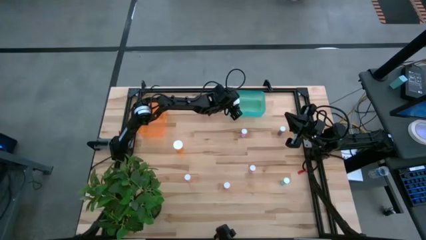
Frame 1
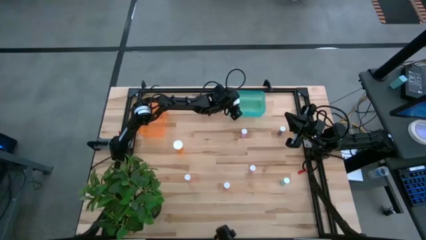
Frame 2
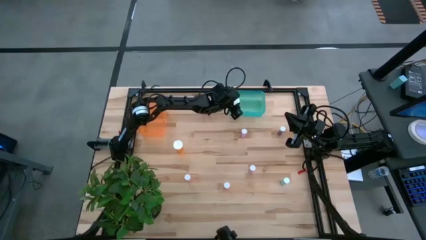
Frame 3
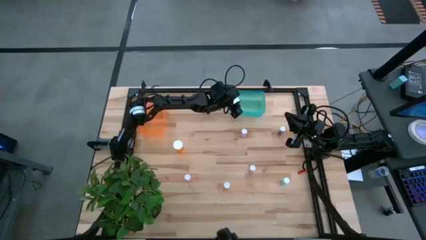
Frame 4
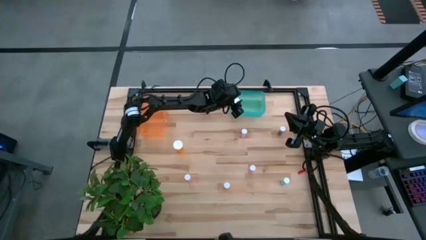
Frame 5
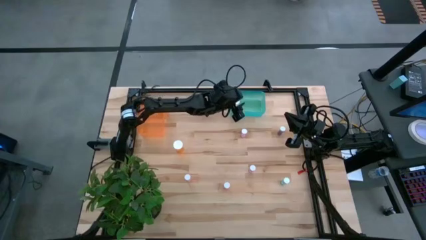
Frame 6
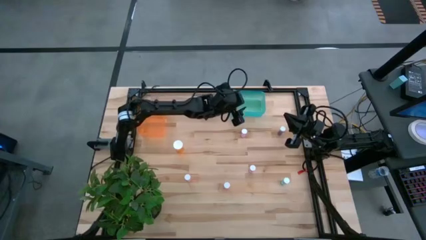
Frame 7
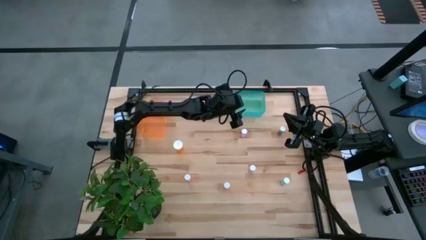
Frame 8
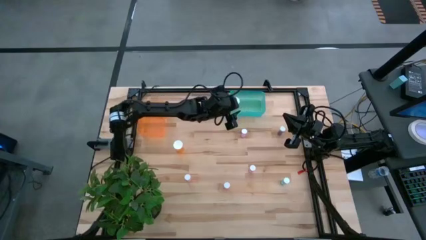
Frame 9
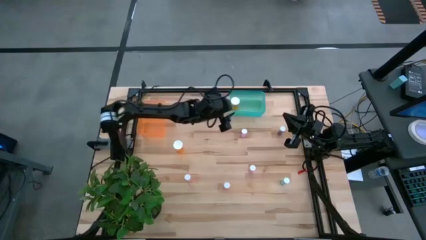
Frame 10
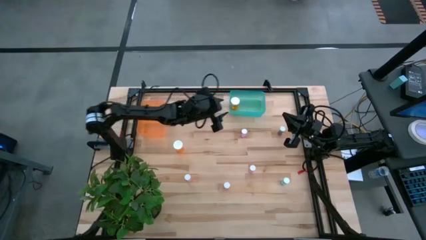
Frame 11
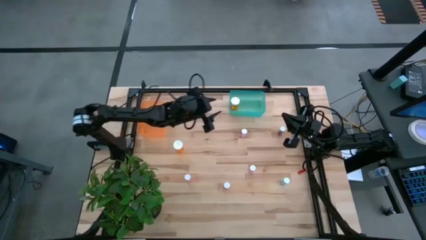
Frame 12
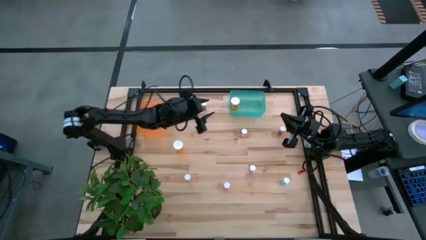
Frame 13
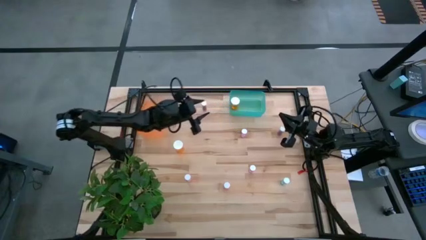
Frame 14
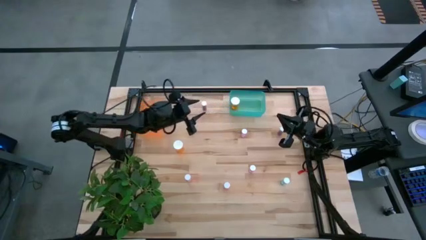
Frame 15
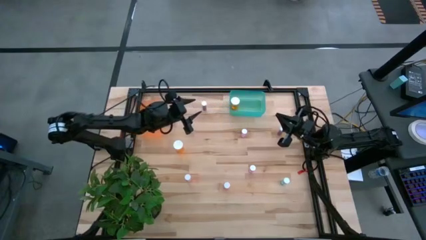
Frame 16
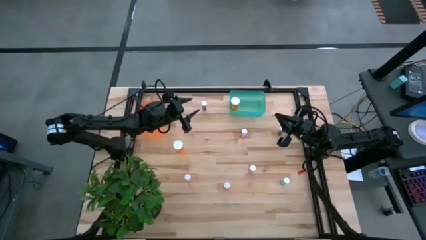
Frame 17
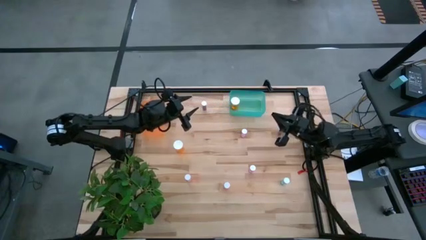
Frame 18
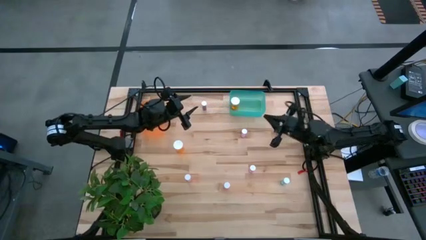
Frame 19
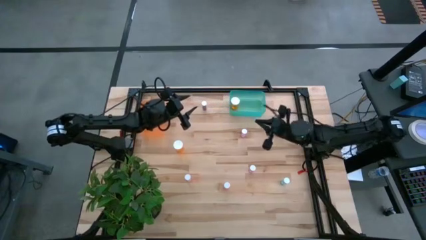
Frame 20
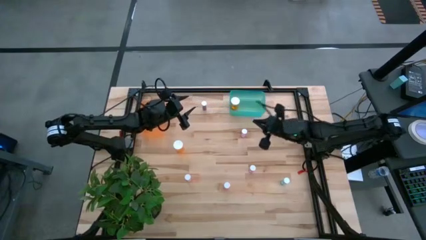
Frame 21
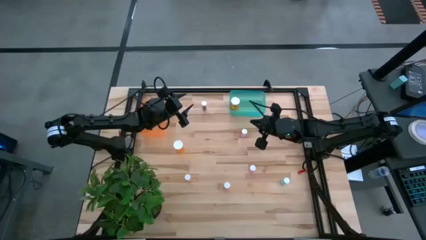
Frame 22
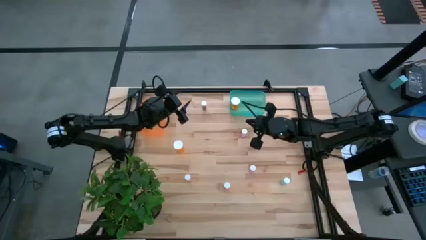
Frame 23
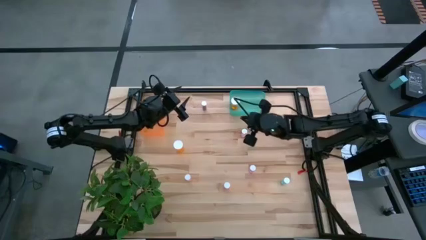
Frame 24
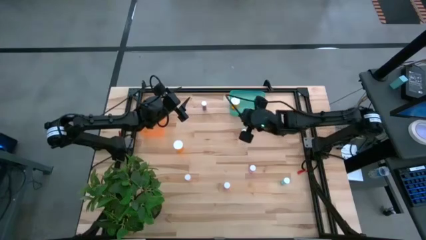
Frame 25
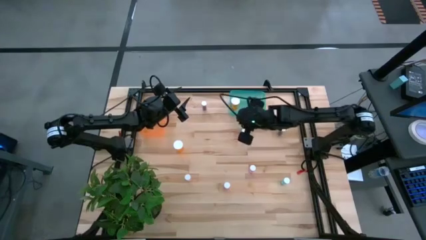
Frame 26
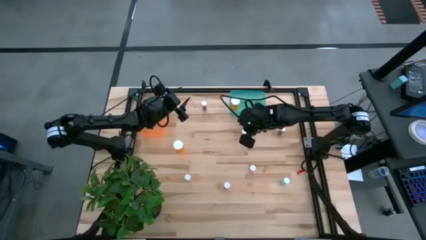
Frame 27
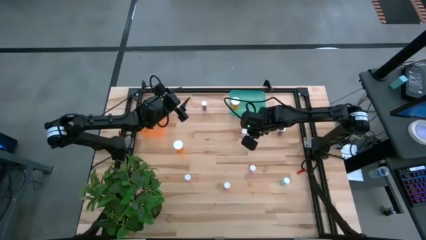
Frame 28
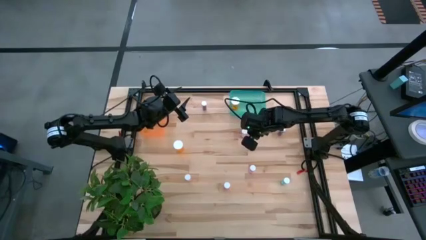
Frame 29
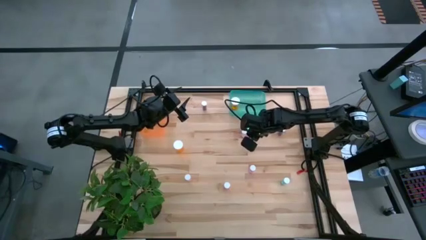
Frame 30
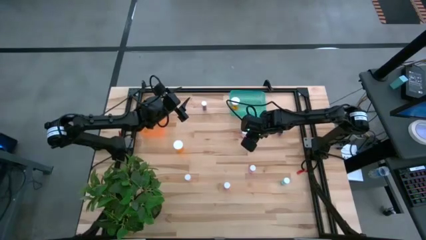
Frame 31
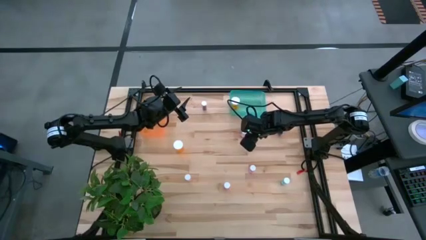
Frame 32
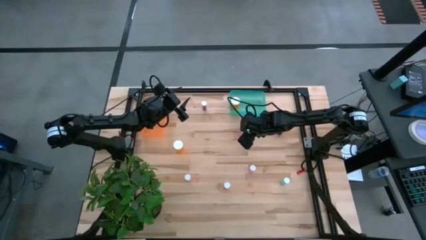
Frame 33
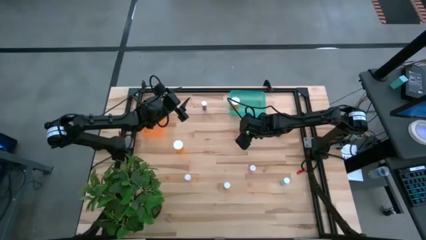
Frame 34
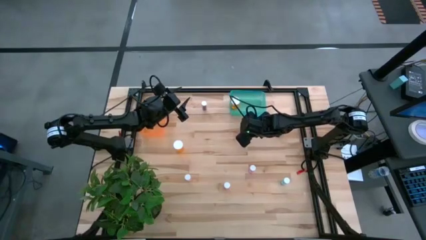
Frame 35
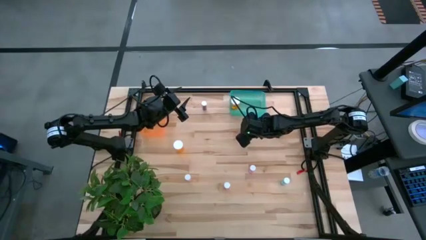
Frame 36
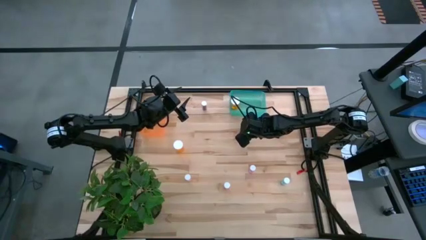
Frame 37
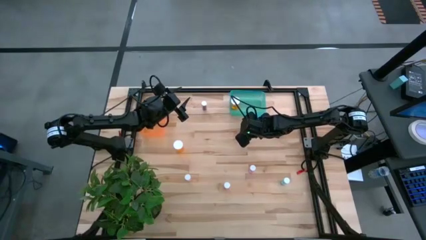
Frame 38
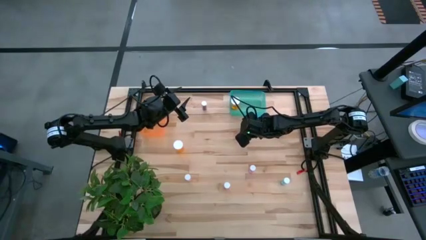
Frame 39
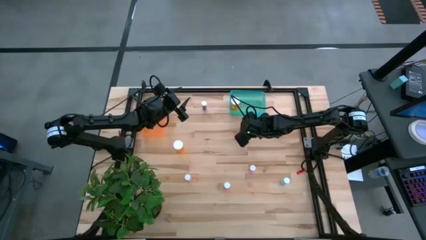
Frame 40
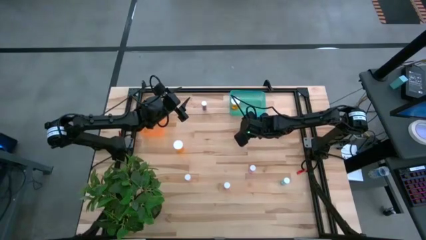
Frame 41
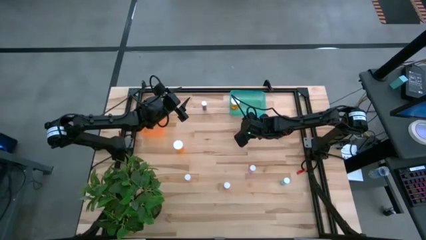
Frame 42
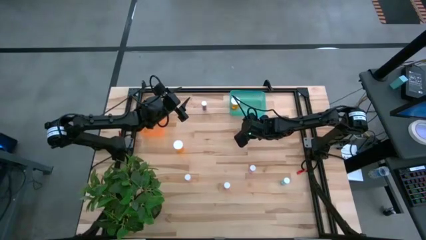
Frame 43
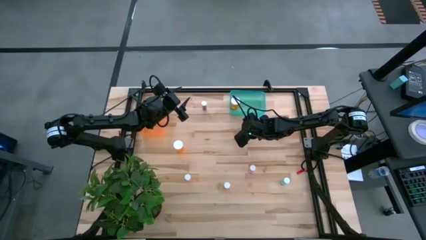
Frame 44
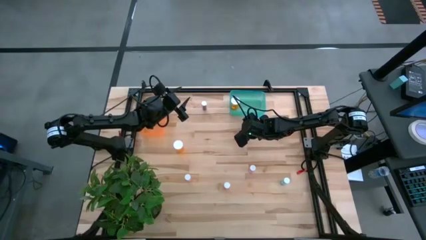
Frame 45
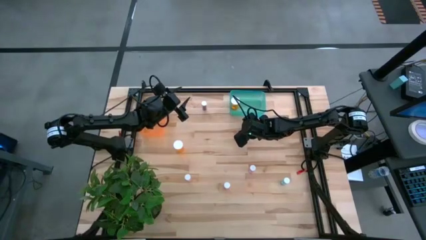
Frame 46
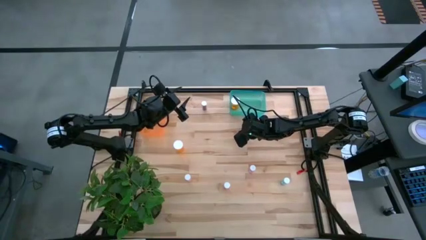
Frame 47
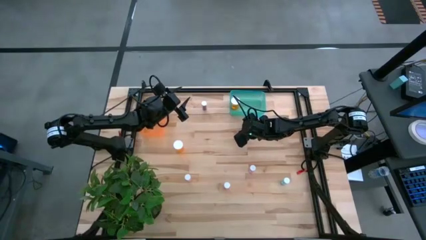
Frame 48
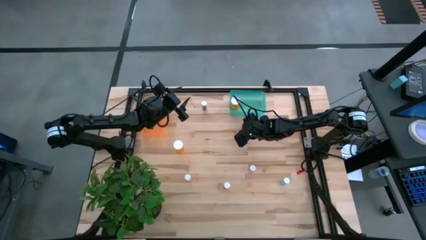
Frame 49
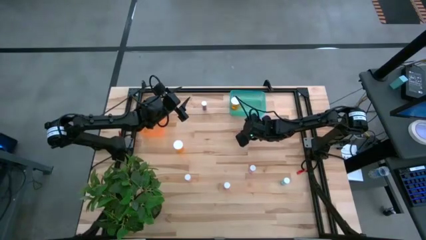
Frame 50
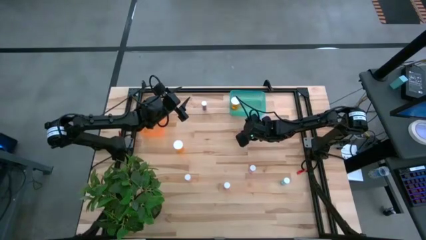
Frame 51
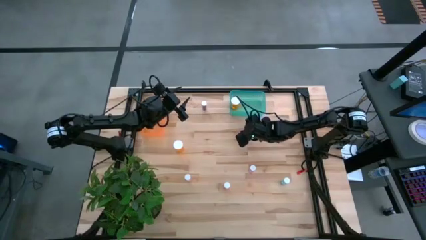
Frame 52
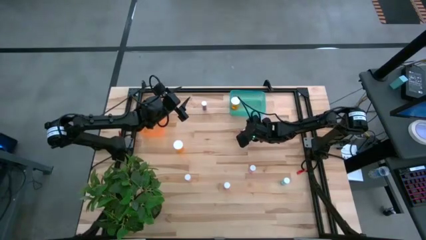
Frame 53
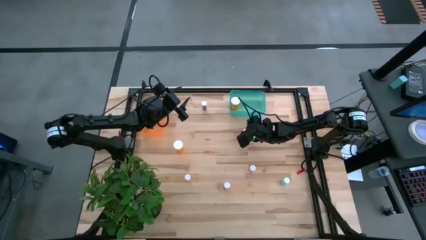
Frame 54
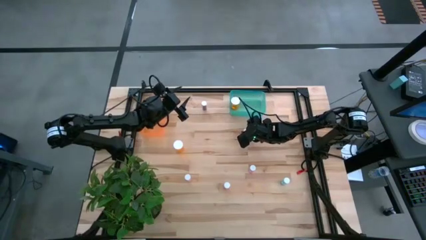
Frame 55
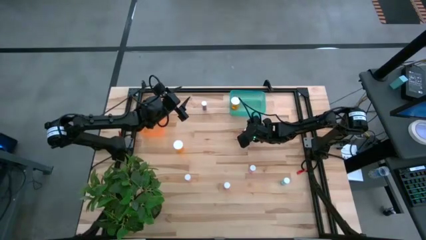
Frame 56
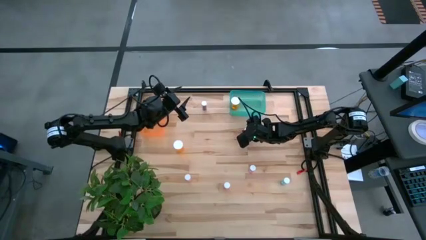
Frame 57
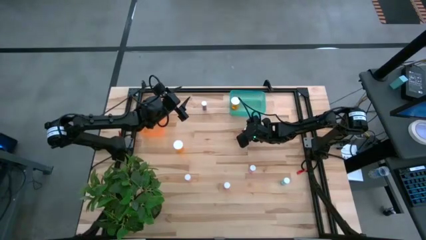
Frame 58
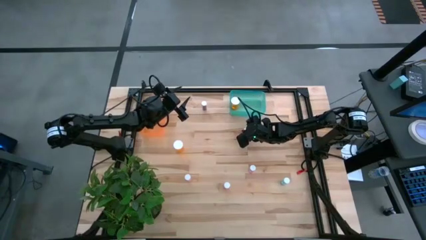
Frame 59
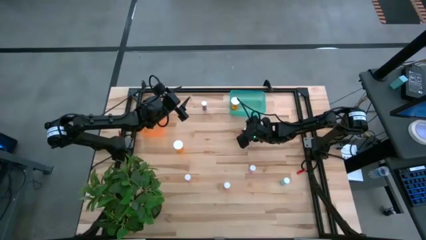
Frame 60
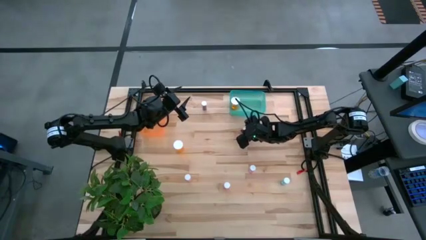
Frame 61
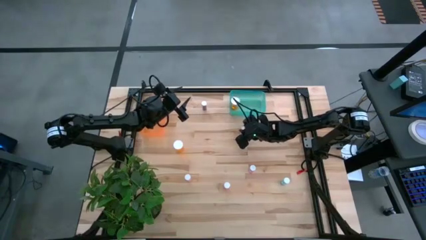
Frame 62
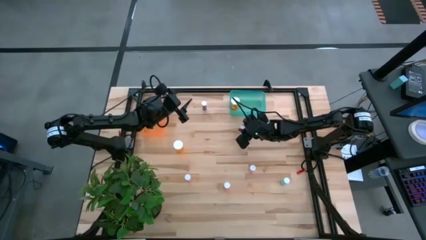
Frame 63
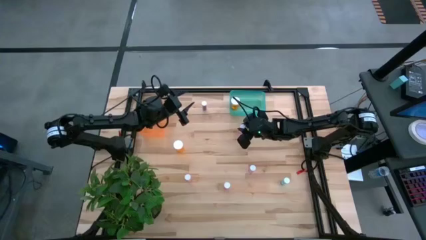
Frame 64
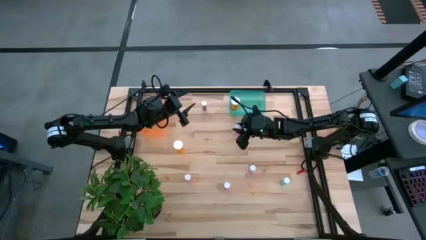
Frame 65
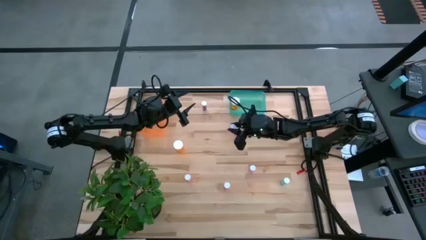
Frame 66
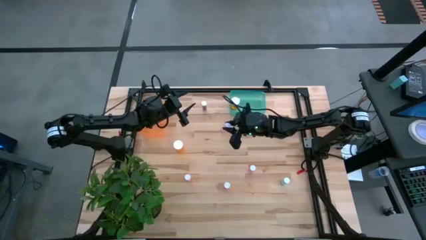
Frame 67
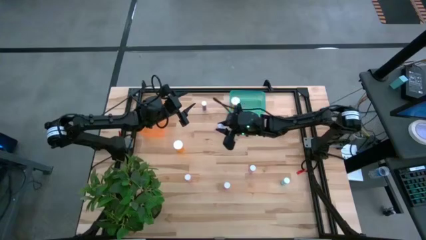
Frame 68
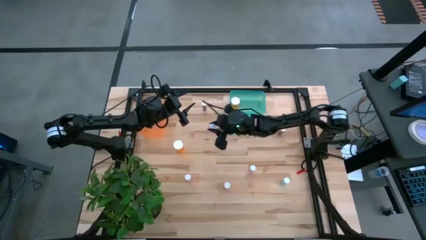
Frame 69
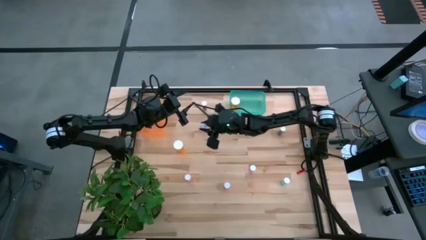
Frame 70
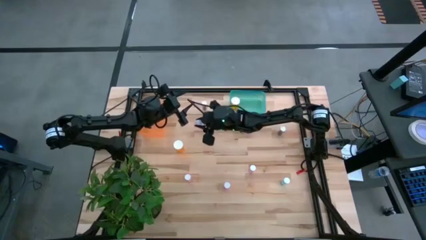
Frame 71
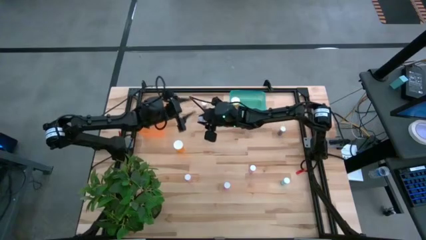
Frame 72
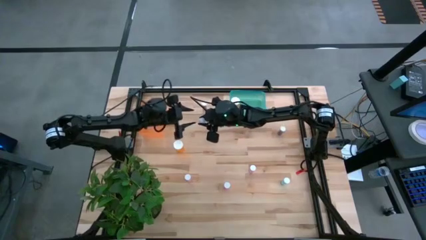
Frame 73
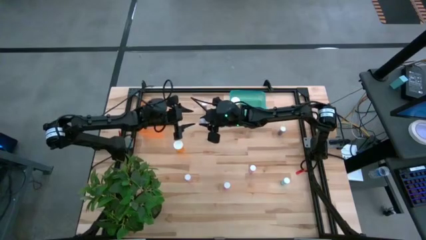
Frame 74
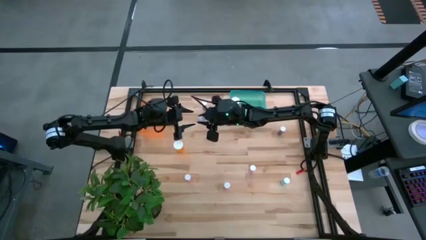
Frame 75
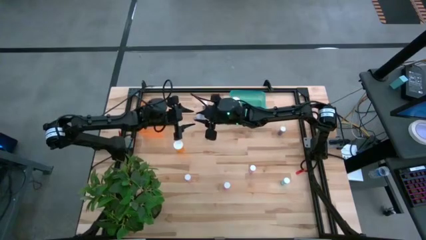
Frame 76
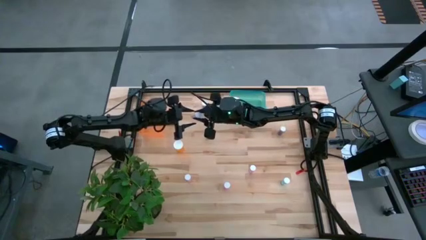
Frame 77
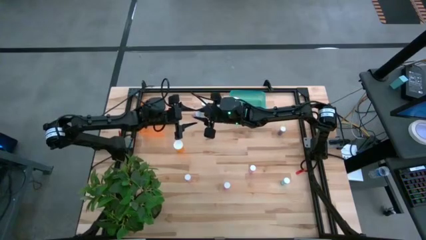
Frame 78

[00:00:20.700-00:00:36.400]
Task: Pick and place medicine bottles into bin by pill shape (circle, oval)
Put the pink tablet bottle into the orange bin
